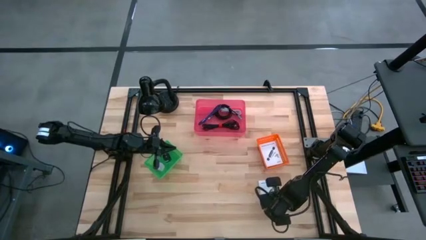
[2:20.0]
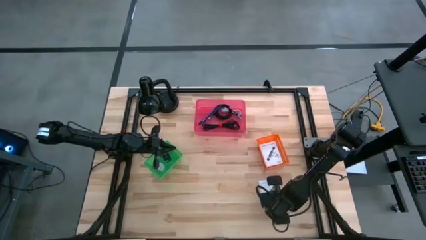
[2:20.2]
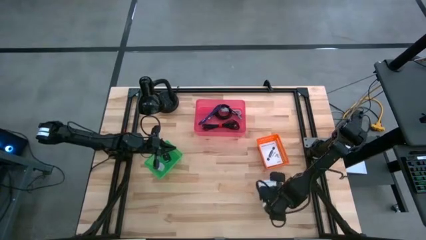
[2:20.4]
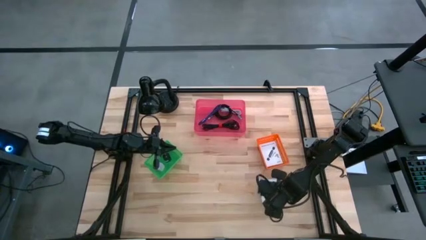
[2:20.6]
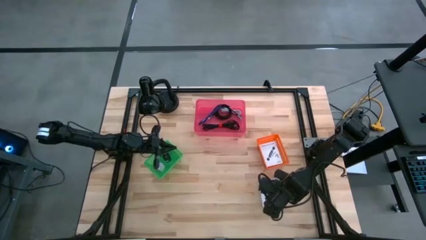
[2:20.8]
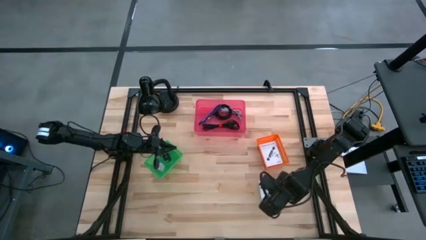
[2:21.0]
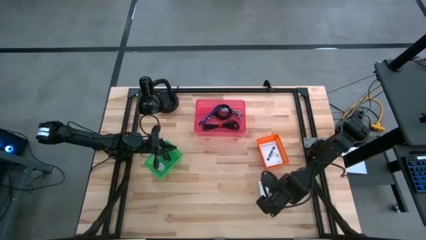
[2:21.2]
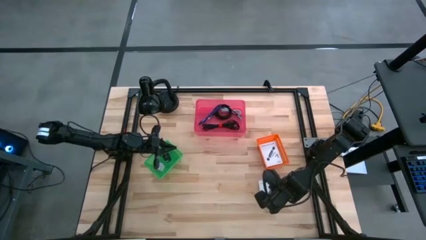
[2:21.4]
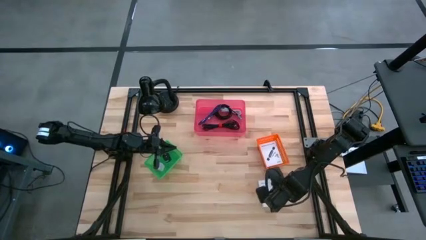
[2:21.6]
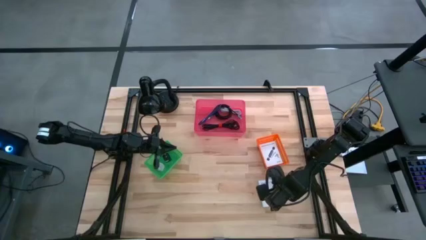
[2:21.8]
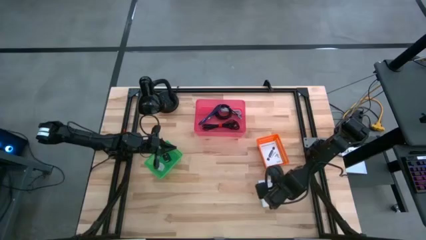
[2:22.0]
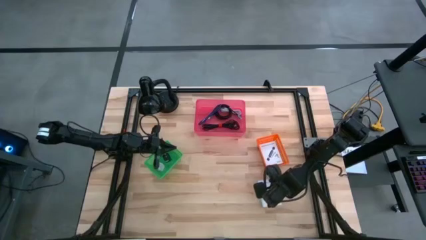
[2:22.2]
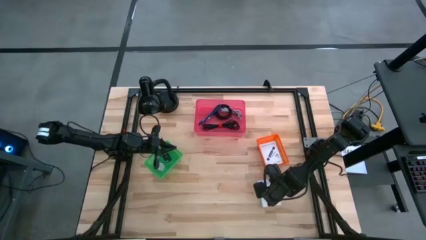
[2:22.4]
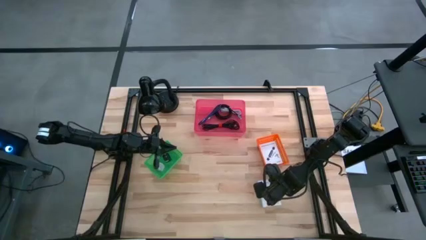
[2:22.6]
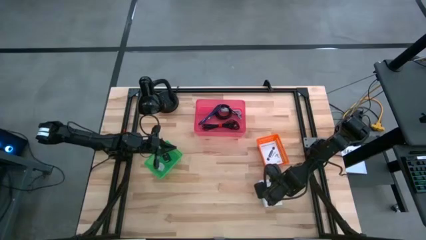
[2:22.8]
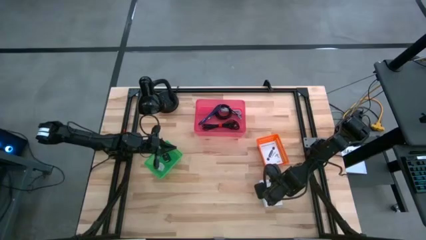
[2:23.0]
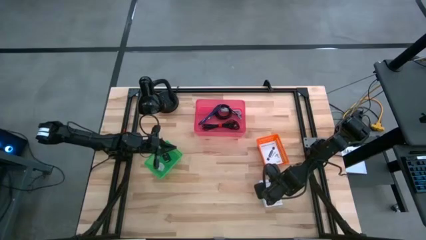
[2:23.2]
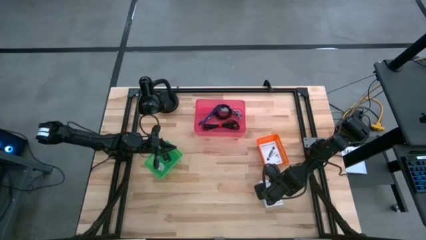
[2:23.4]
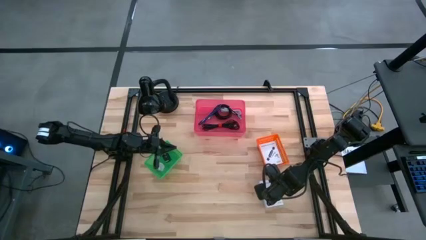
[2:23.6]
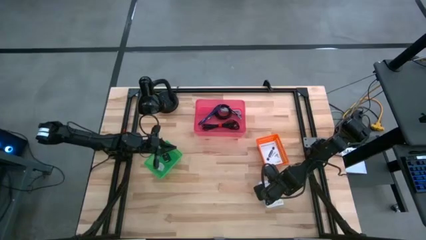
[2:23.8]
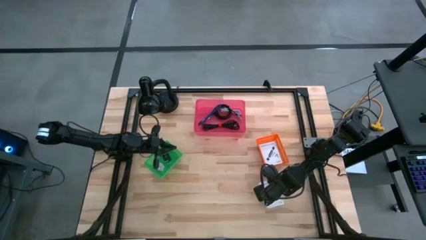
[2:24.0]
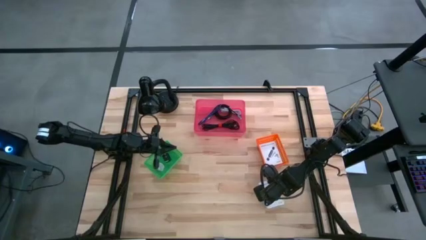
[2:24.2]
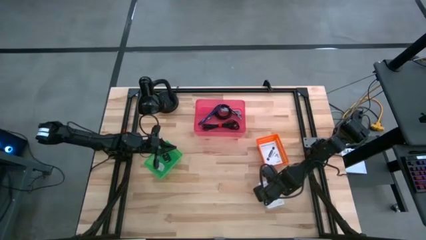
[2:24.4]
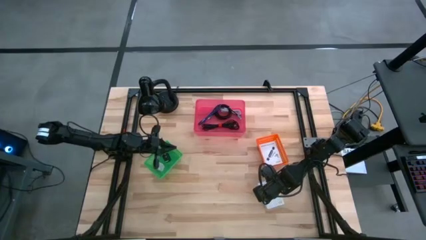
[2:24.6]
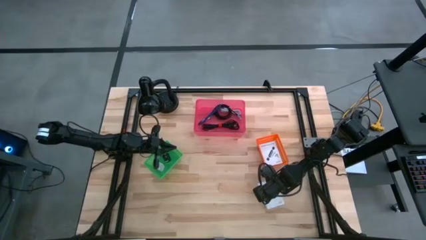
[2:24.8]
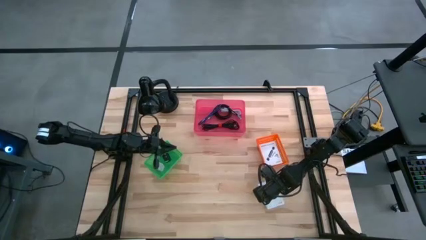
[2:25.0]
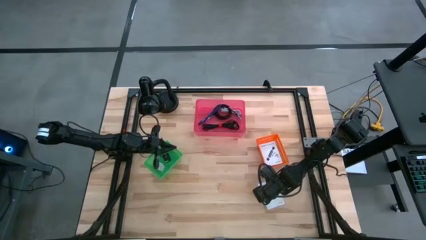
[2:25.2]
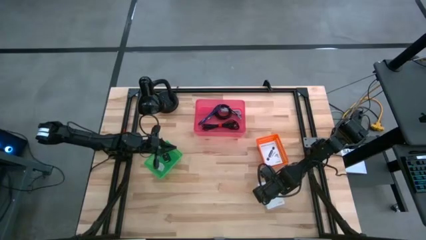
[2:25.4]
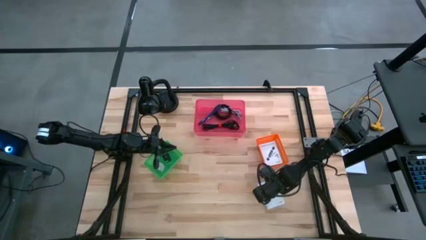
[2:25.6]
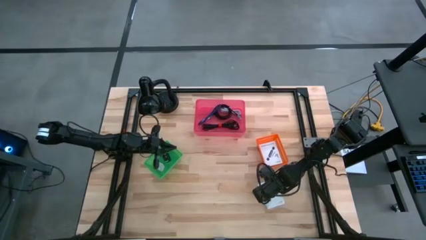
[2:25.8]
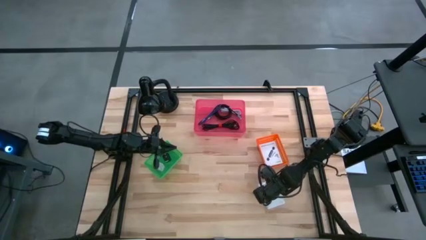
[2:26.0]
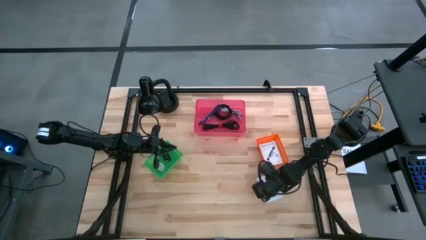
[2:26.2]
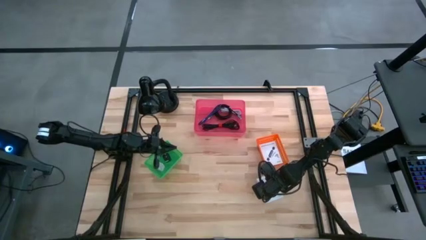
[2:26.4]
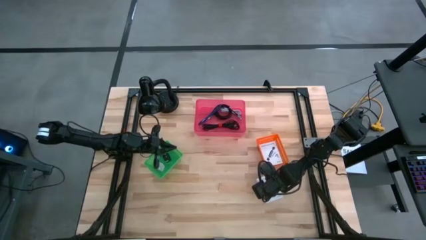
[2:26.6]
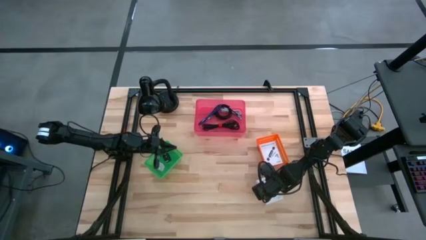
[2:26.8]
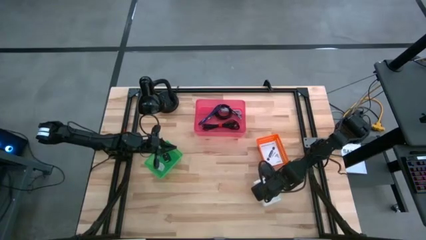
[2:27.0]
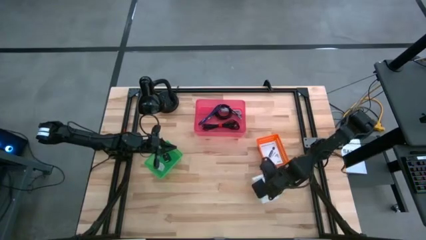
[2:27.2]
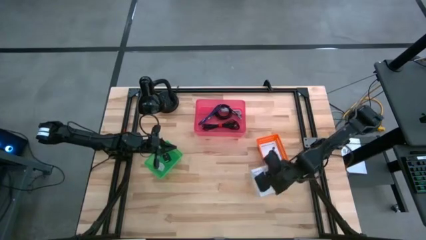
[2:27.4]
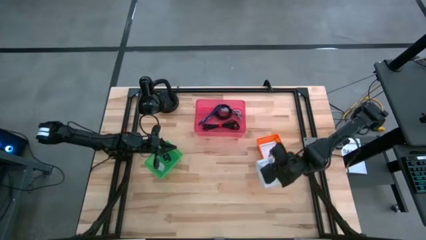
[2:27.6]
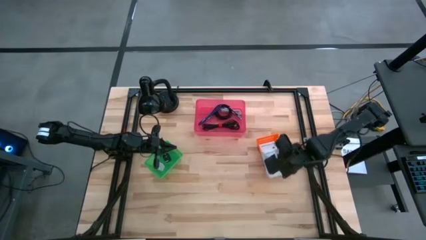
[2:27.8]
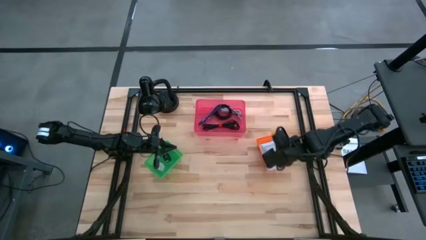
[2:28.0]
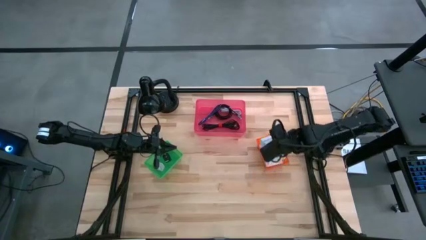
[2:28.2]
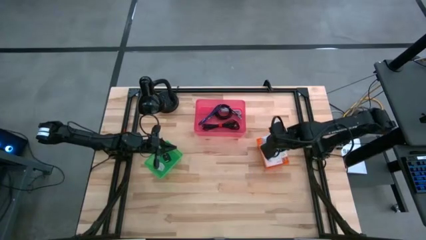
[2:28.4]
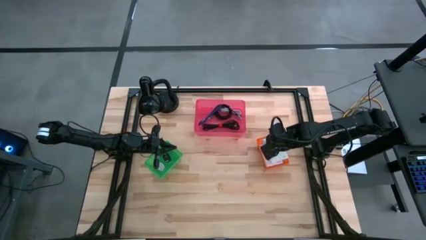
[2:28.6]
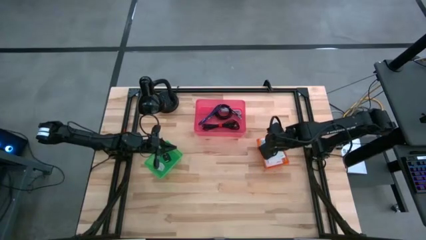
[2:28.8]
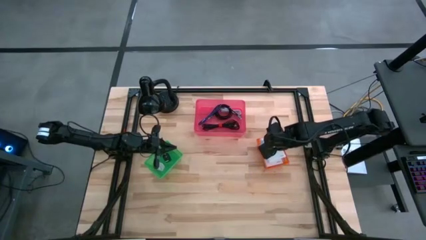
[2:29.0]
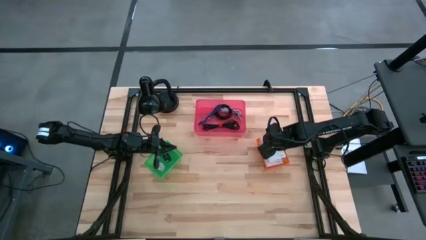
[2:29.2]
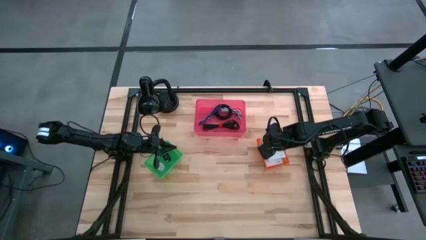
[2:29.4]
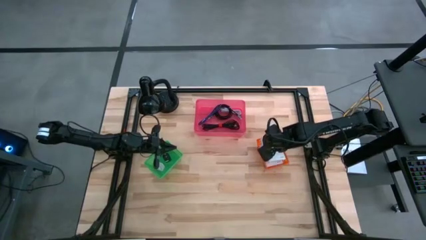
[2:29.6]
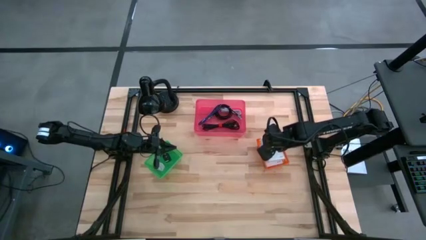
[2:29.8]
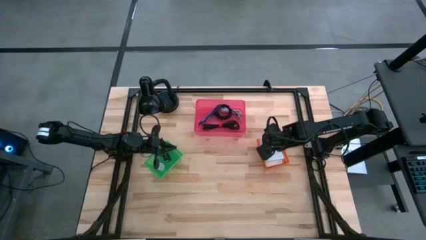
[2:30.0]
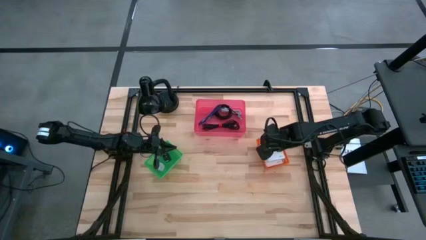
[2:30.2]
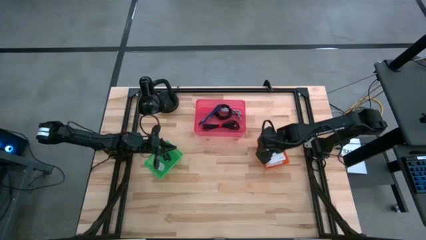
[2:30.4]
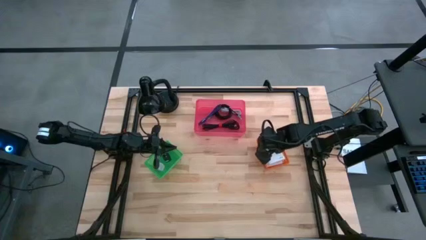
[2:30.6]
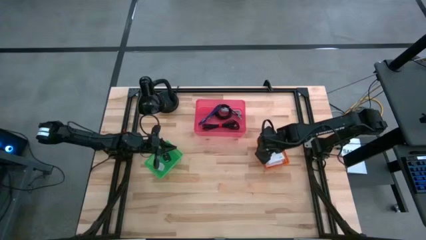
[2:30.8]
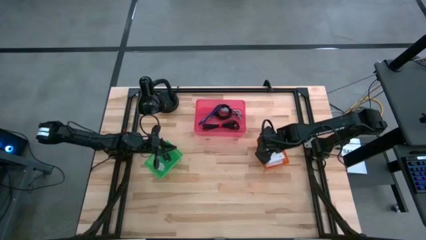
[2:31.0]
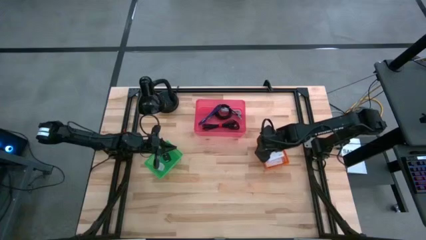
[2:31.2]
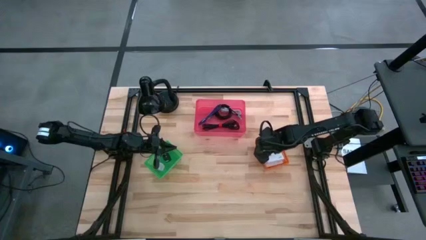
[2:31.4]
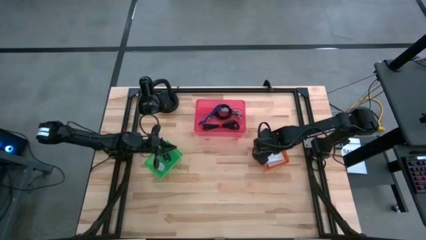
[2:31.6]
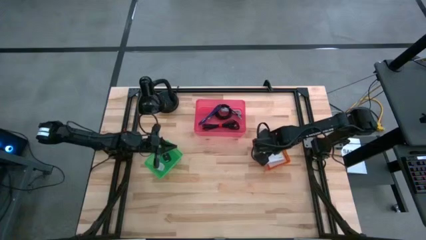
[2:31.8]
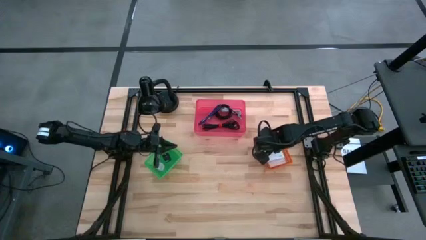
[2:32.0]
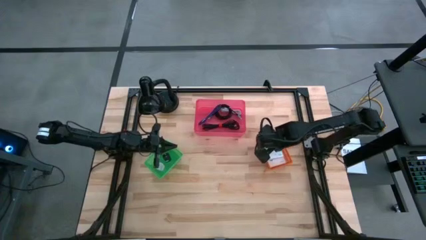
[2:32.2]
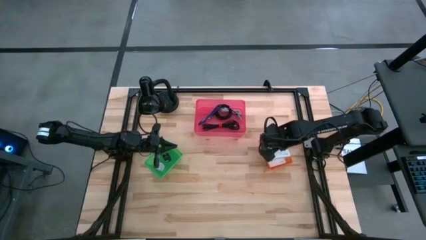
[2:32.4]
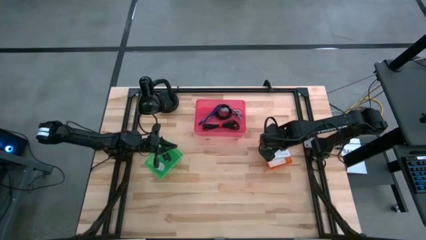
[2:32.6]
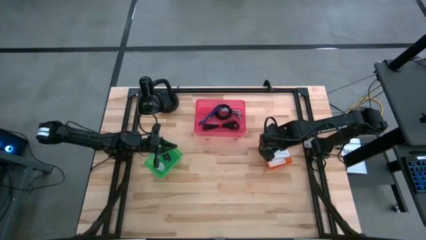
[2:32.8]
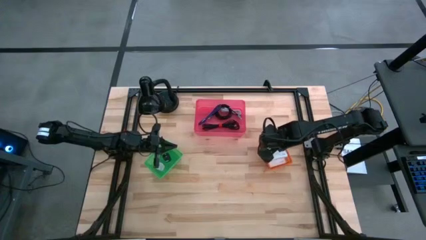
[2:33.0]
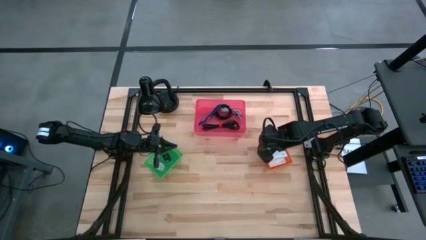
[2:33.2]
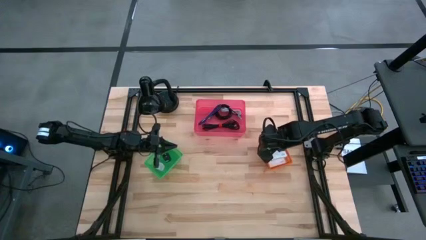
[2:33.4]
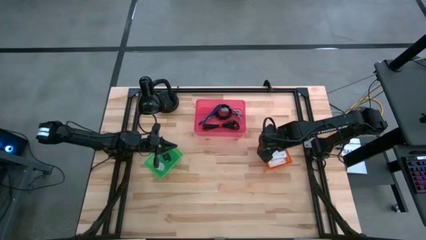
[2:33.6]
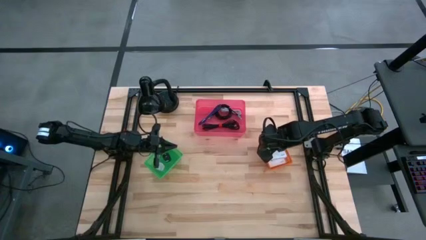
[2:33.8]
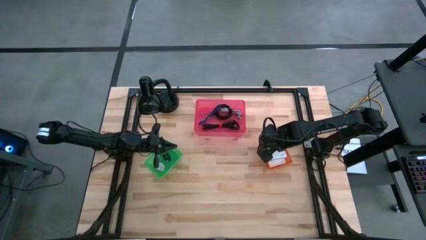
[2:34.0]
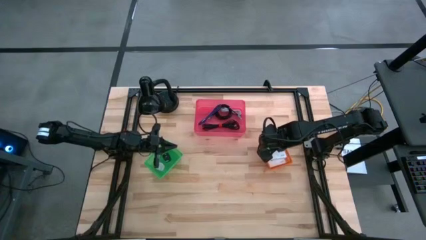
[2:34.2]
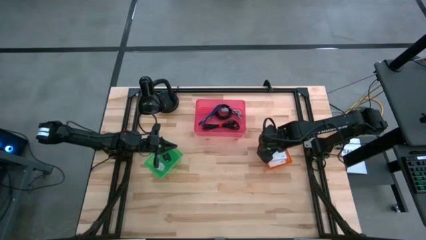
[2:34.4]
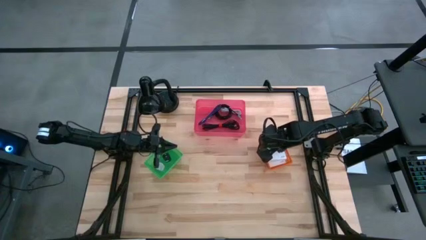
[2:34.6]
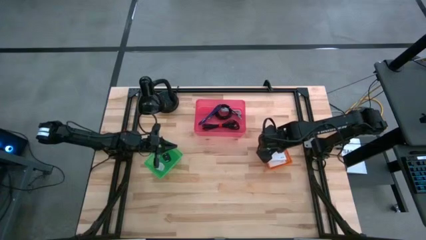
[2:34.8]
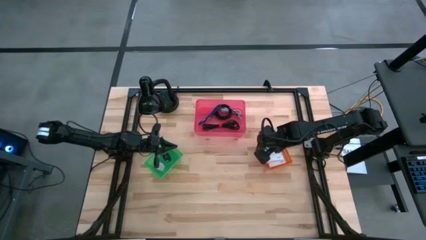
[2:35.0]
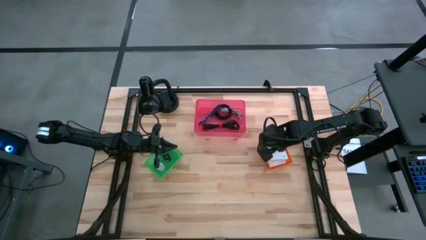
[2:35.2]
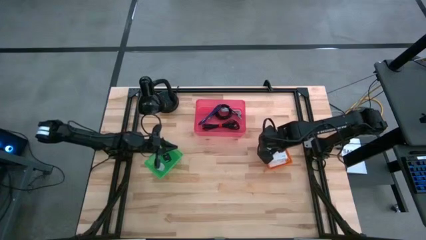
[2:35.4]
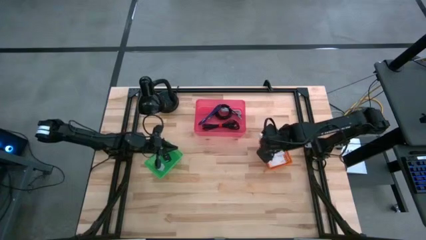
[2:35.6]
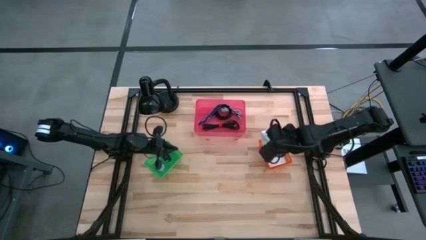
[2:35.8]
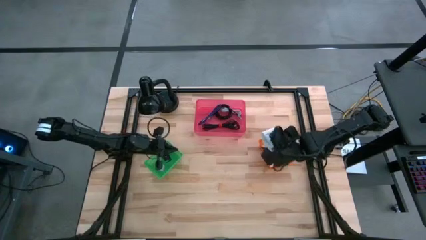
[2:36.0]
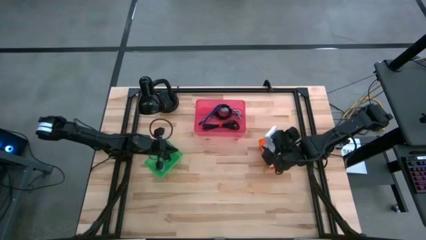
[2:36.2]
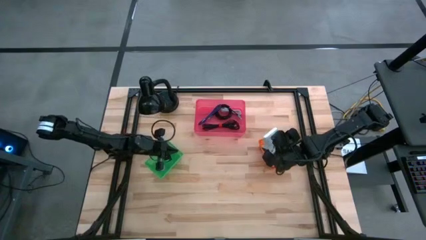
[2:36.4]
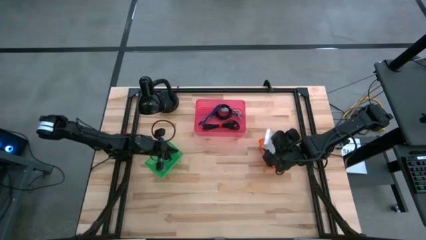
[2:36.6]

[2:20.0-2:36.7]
Task: Pick and place items into bin
Put the card reader box into the orange bin
